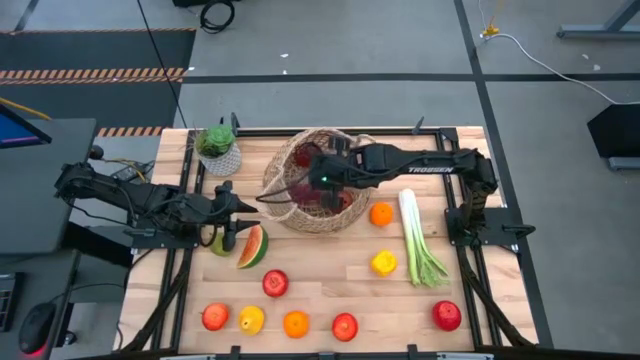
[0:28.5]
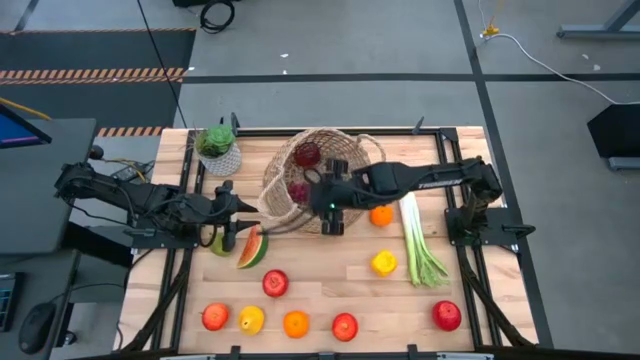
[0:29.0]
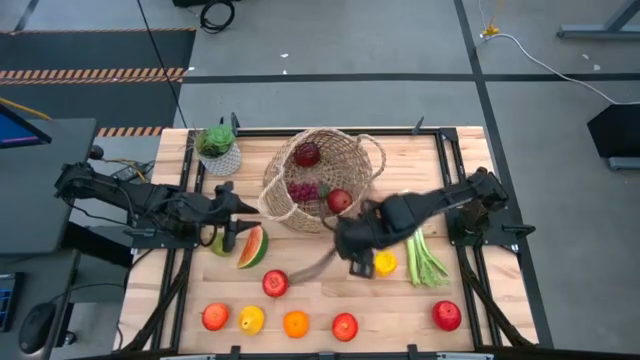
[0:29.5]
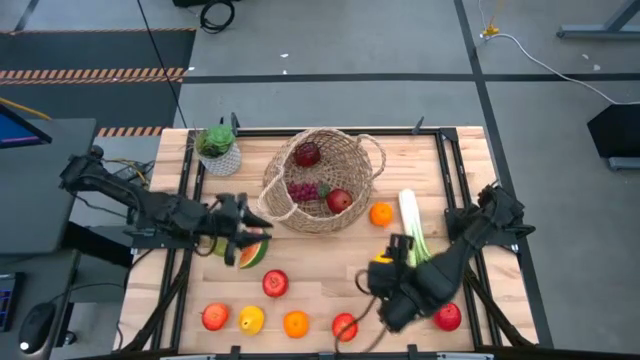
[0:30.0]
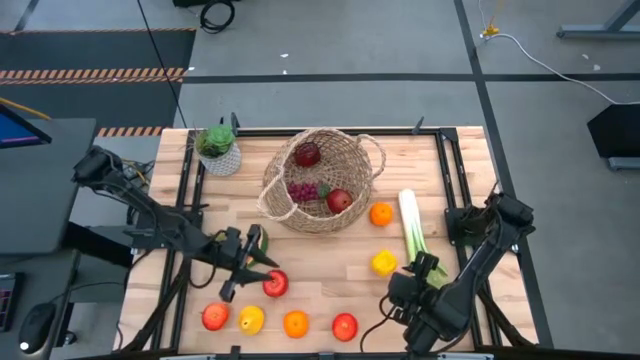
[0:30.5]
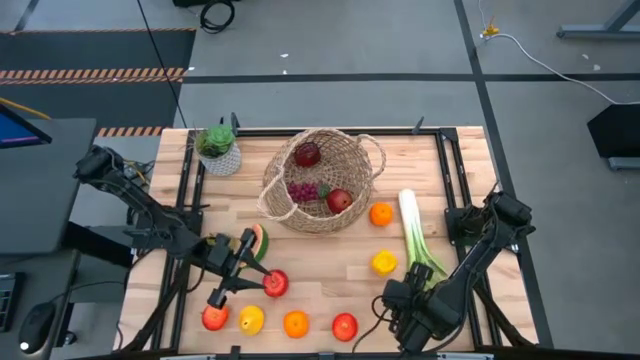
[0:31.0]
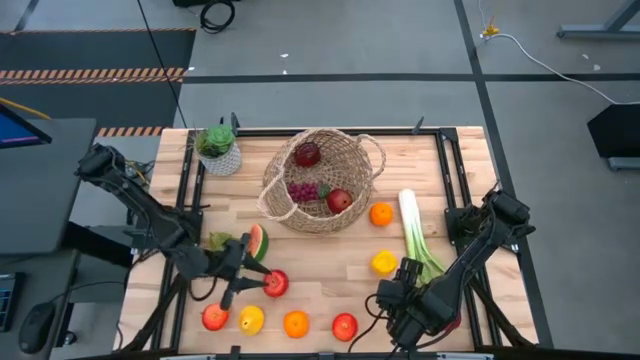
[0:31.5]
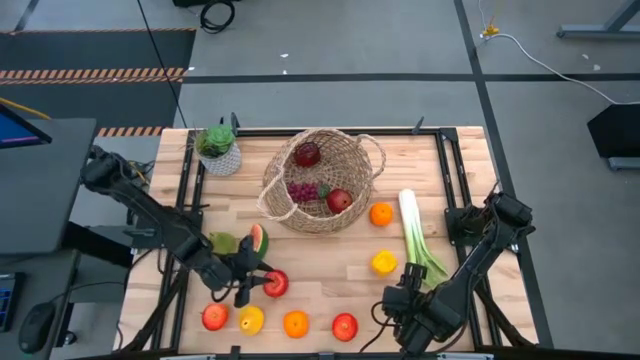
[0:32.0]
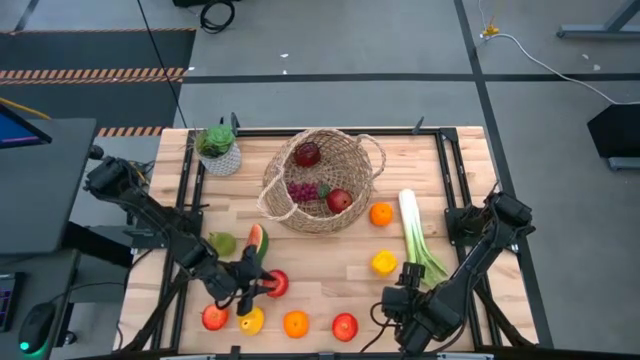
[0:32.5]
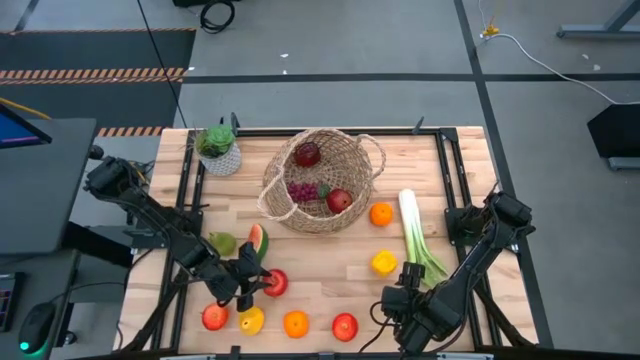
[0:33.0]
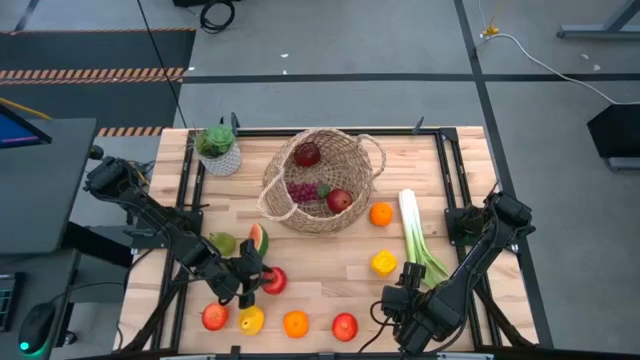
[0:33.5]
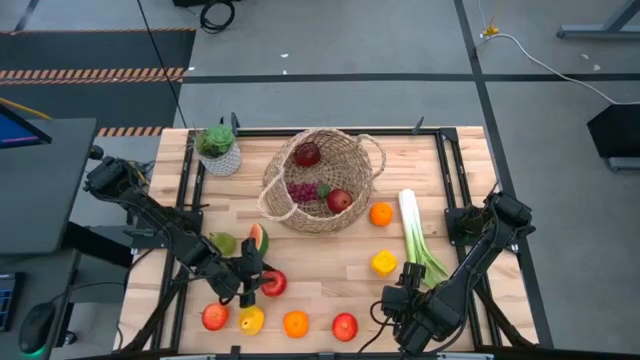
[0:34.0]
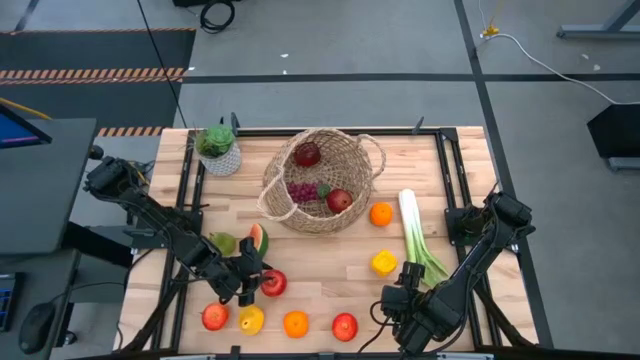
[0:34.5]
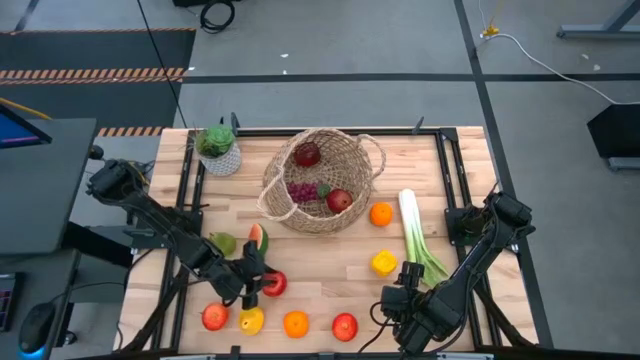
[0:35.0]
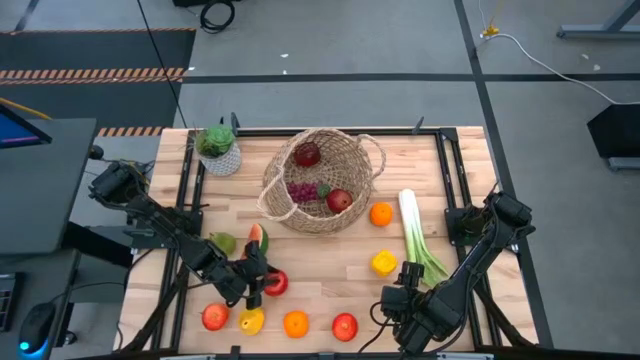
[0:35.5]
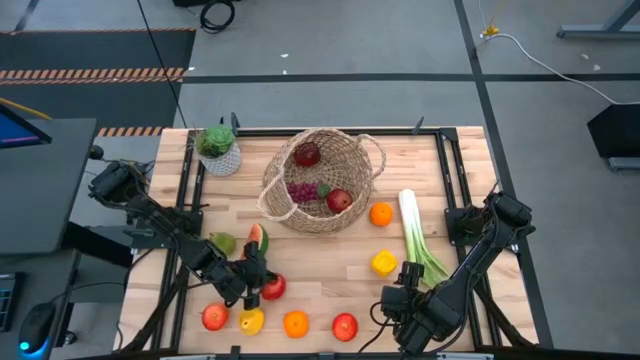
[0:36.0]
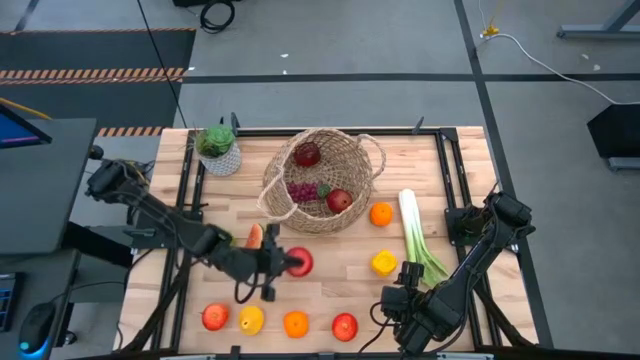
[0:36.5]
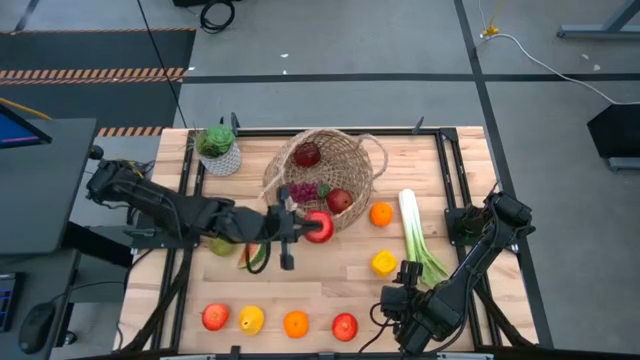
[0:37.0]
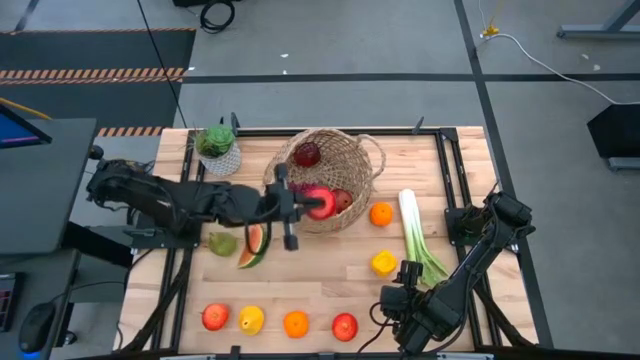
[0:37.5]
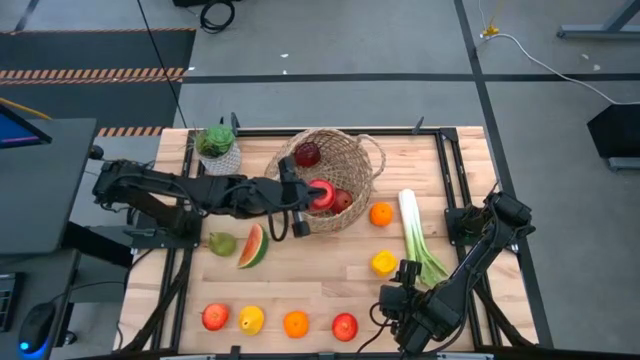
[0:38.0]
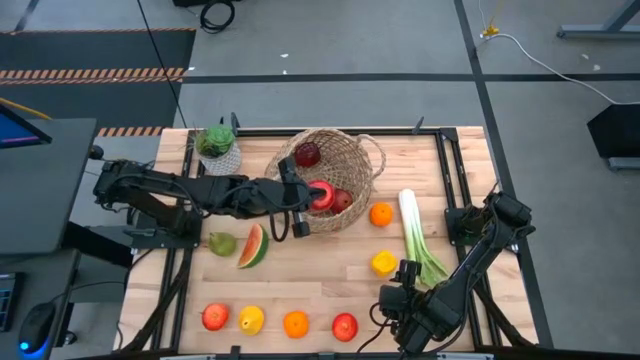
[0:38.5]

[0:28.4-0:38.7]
Task: Build produce basket
Put the apple into the basket

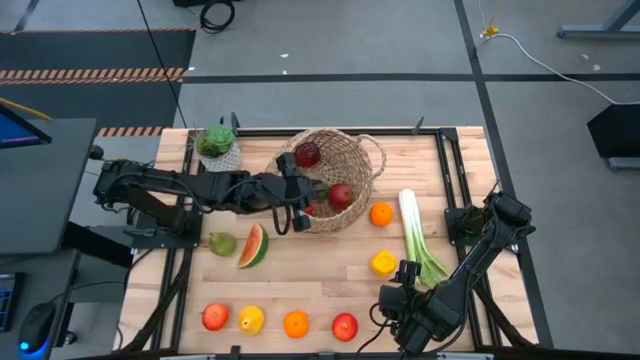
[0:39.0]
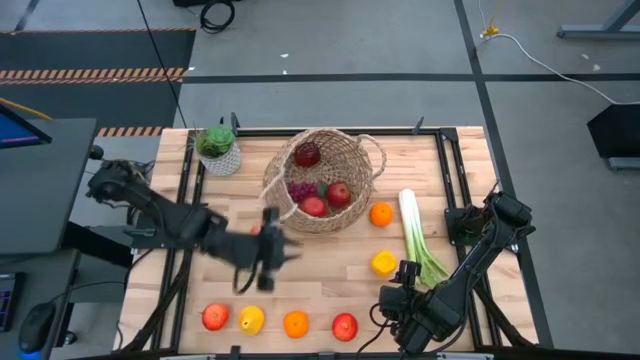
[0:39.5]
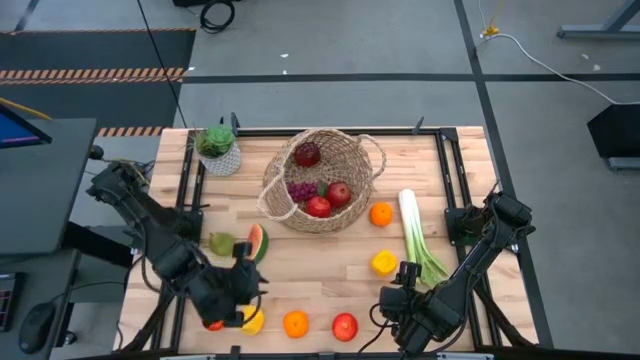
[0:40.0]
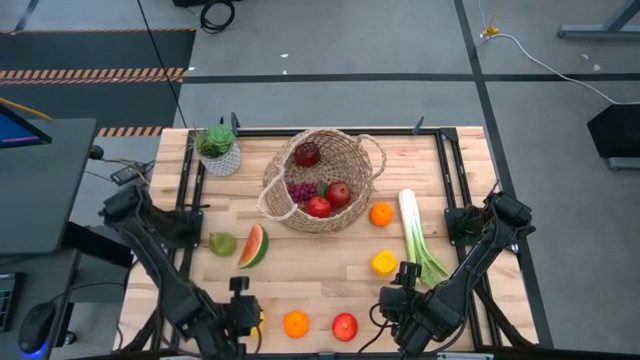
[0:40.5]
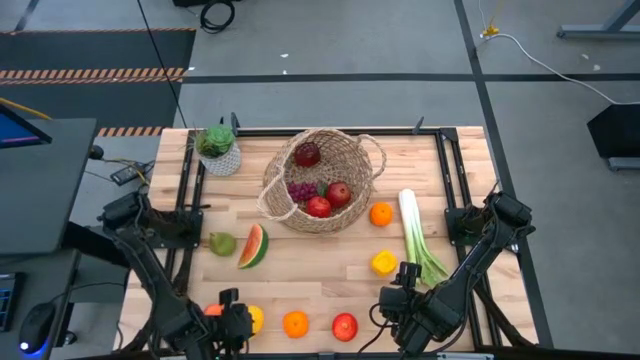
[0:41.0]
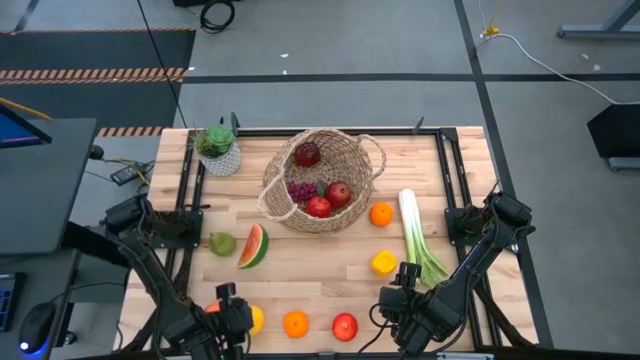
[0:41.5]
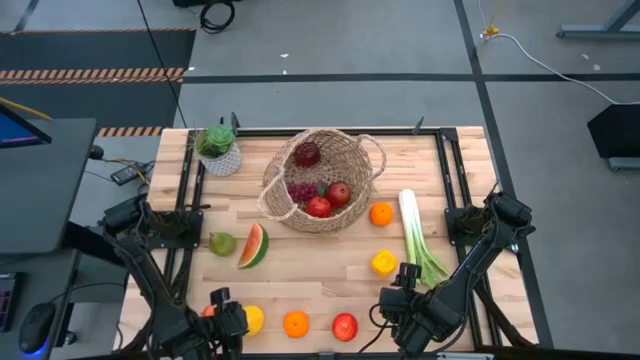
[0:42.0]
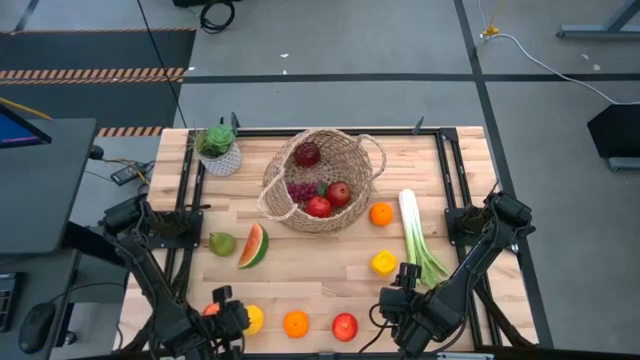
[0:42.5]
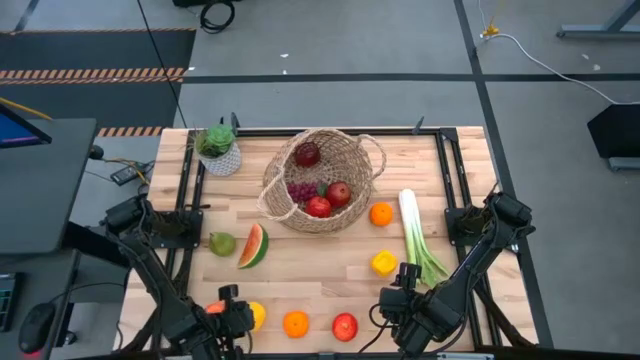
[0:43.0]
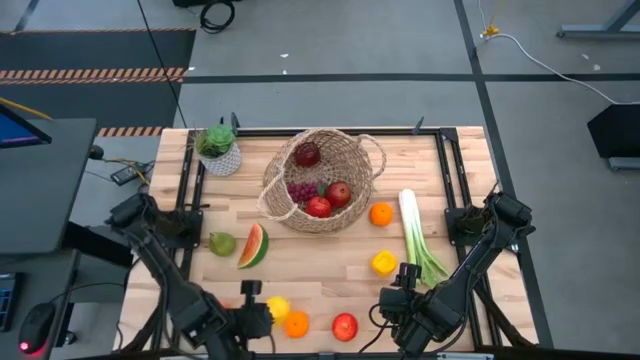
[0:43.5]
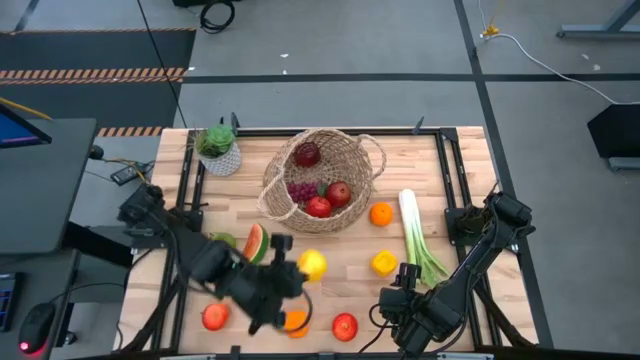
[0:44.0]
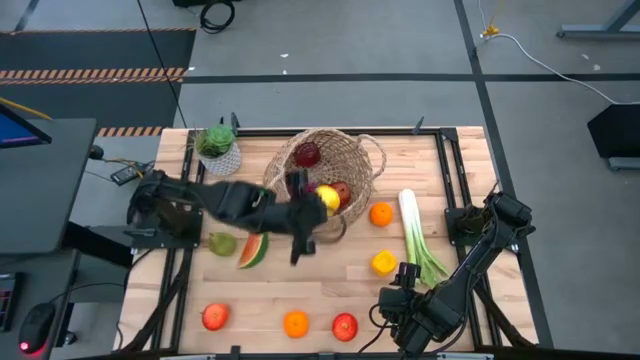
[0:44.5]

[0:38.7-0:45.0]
Put the pear into the basket

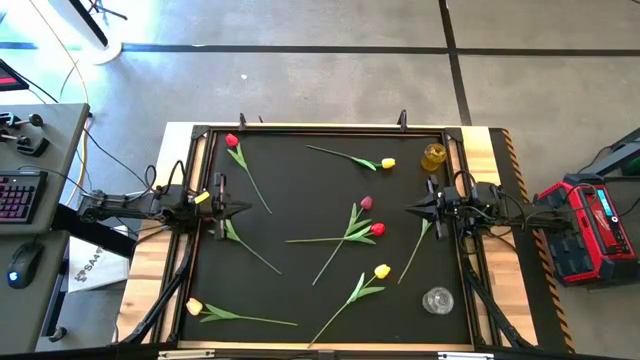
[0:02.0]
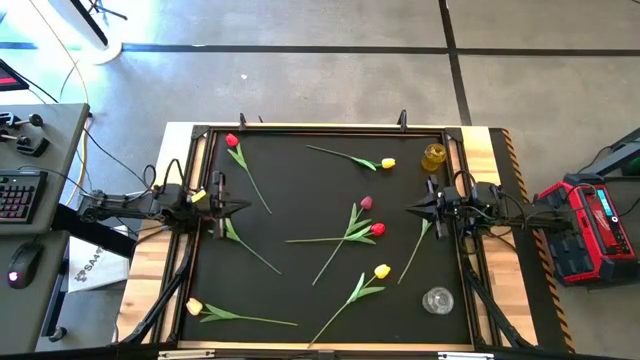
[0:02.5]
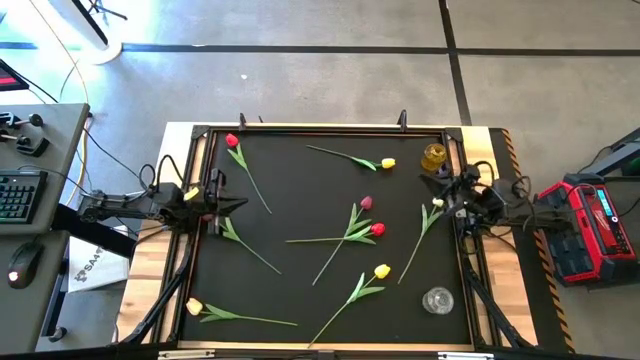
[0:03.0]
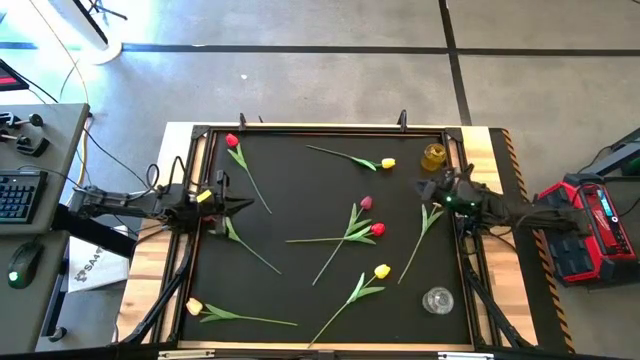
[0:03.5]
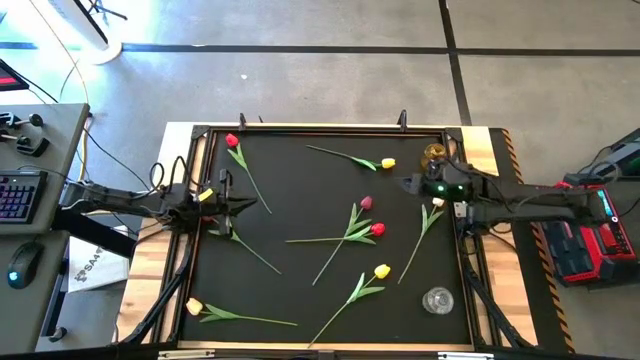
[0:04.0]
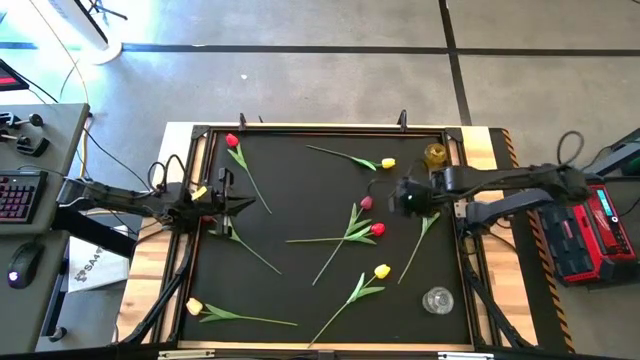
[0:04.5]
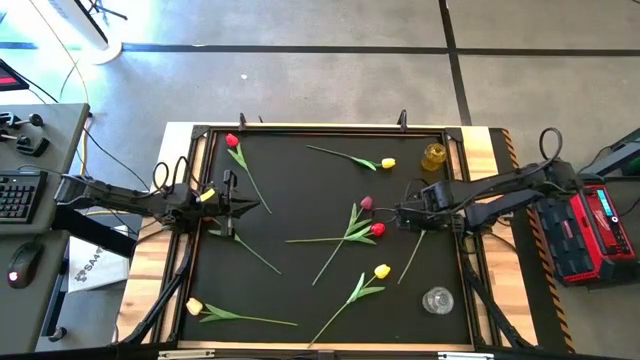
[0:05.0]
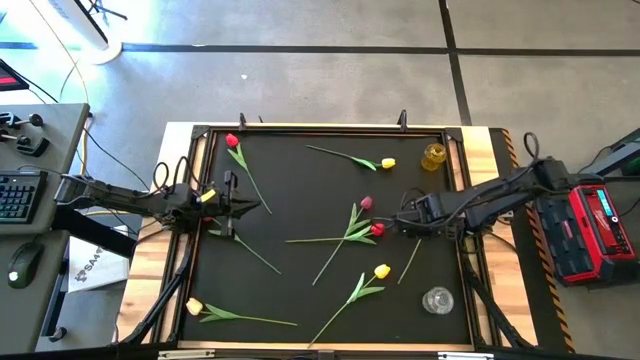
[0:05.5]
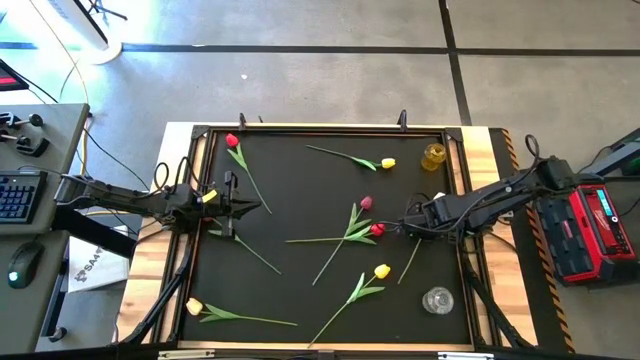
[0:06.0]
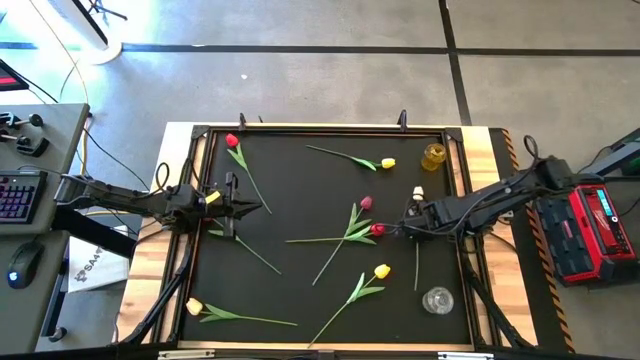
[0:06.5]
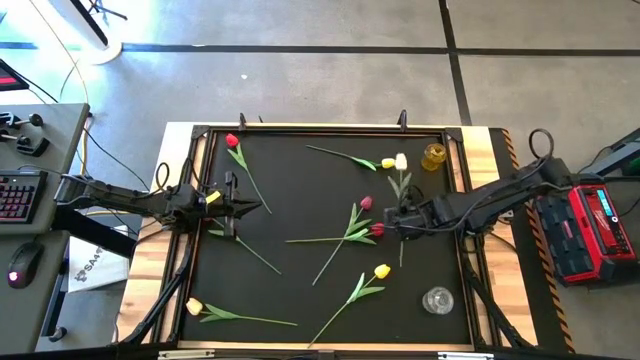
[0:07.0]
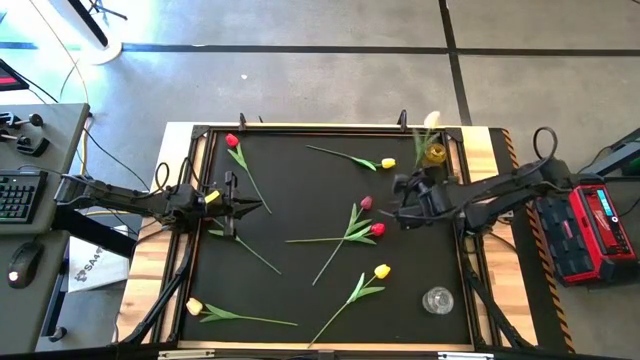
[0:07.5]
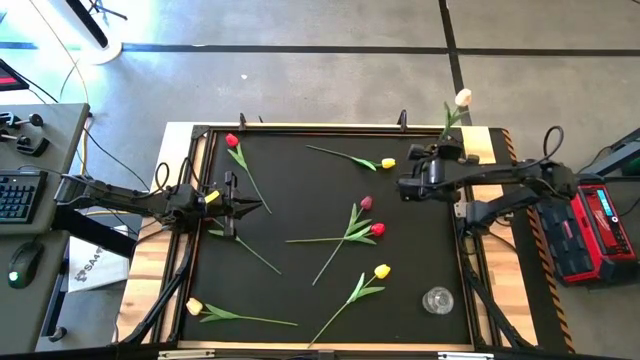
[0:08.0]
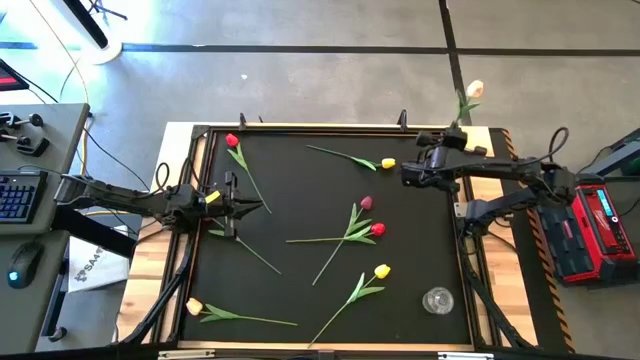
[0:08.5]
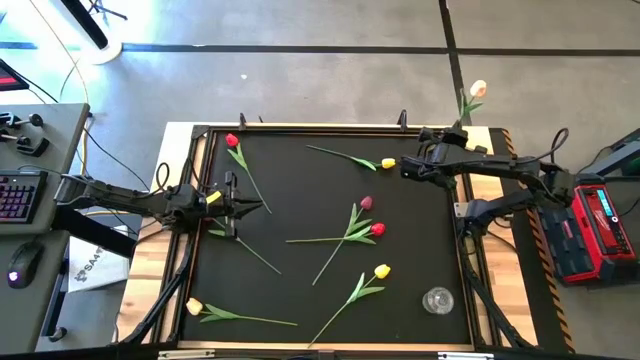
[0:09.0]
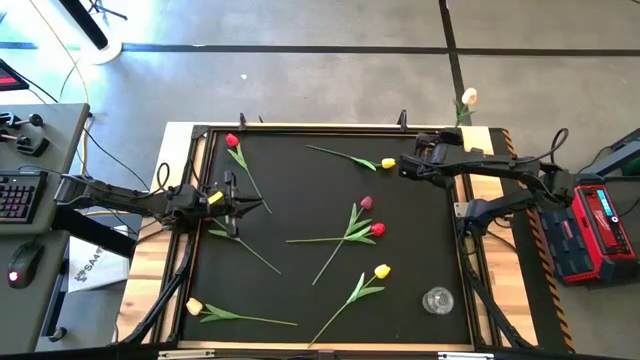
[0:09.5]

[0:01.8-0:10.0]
Task: Sort flowers into vase by color
Put the right white flower into the yellow flower vase
